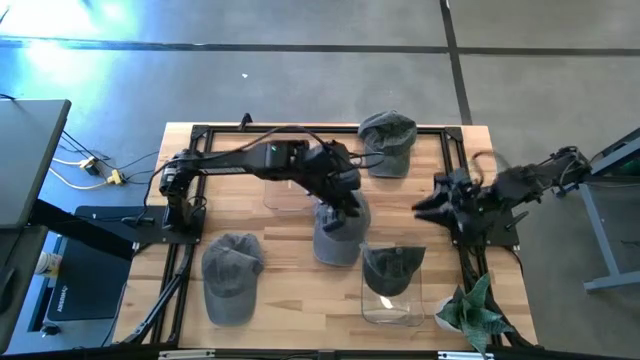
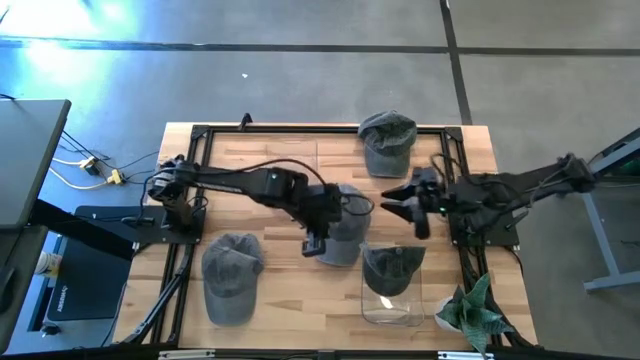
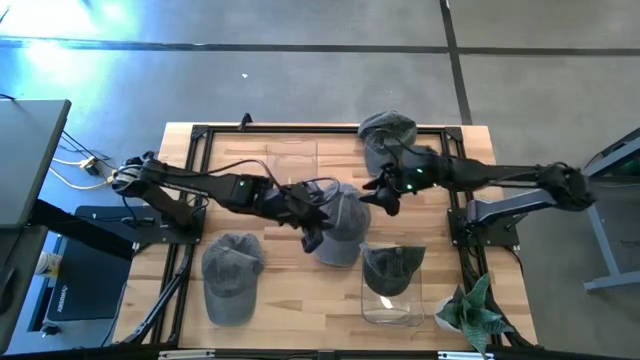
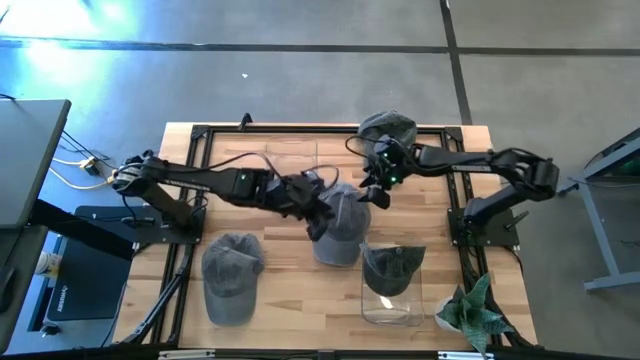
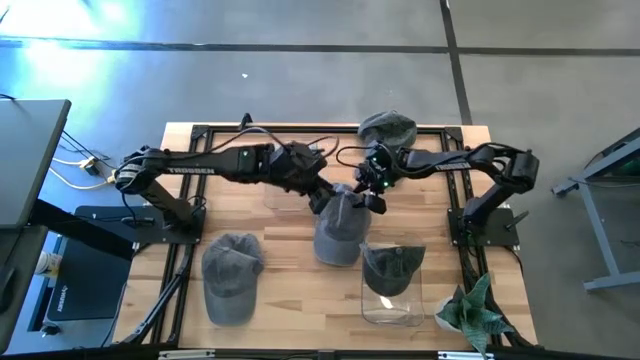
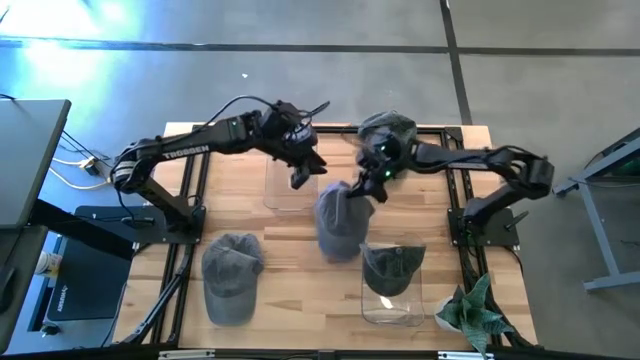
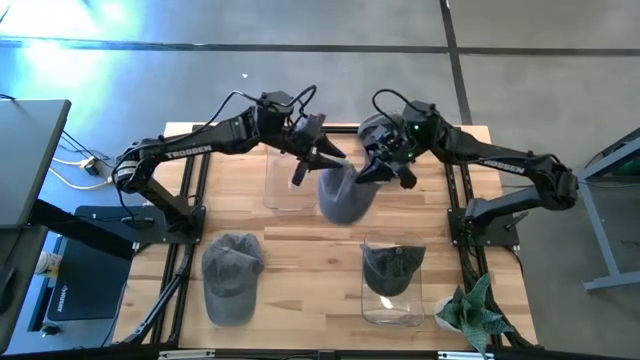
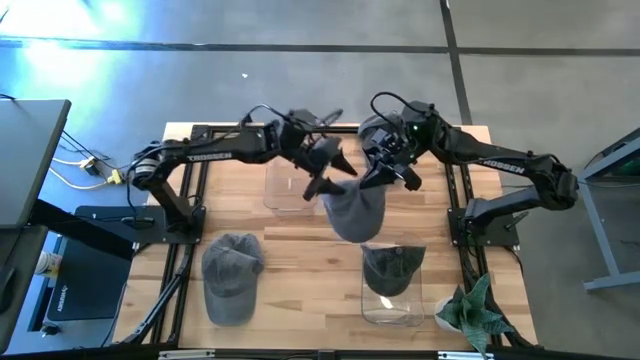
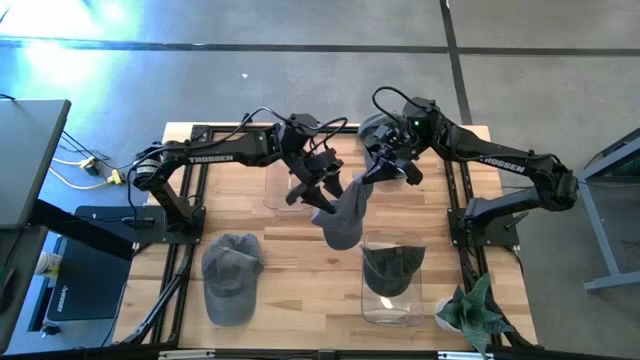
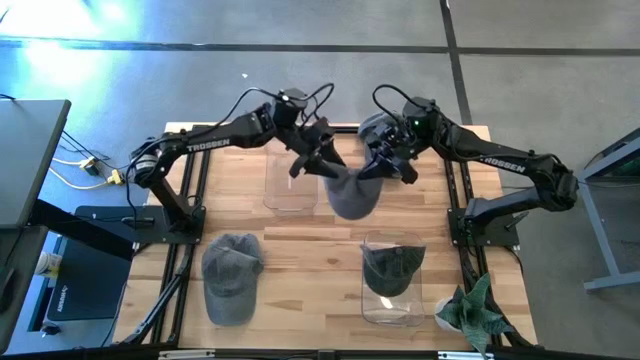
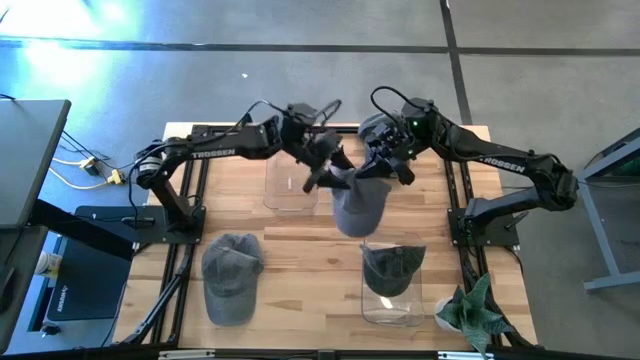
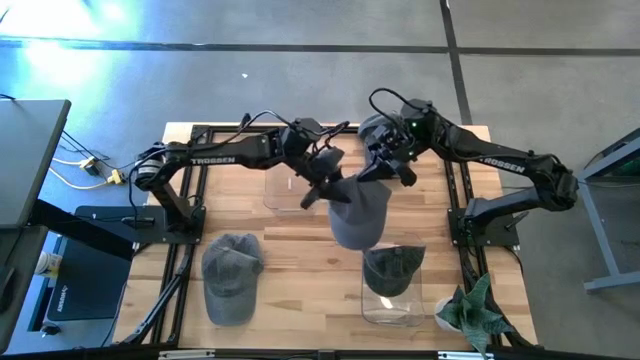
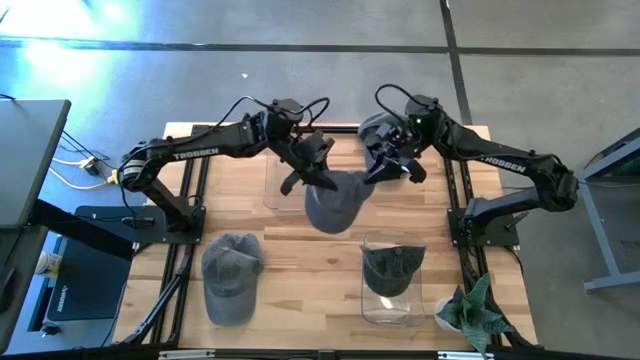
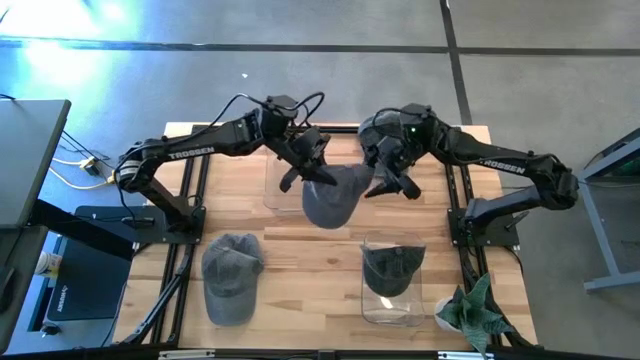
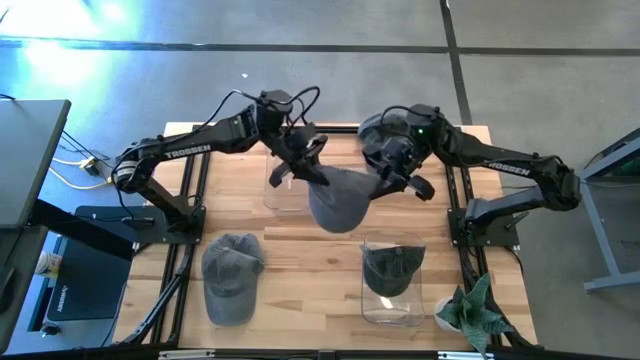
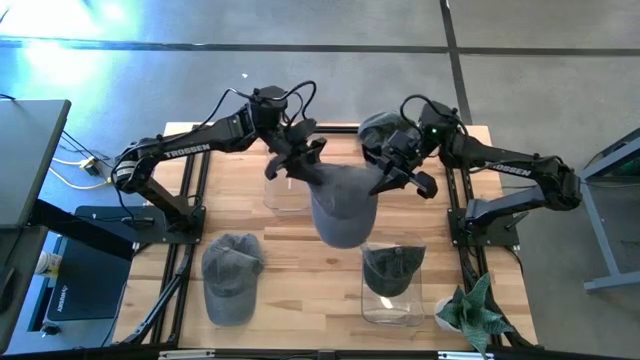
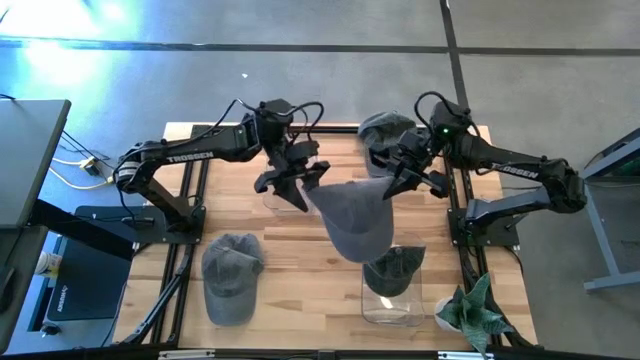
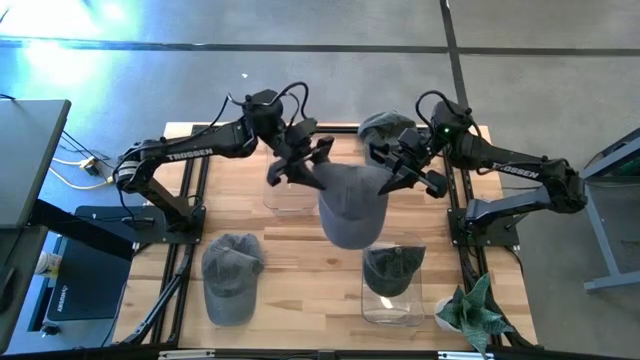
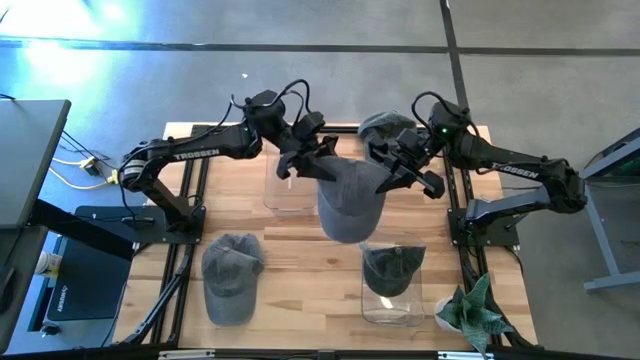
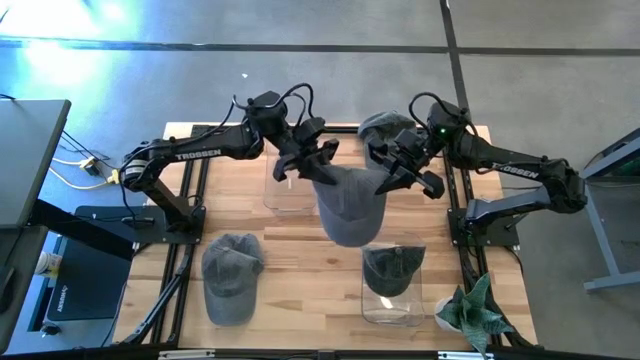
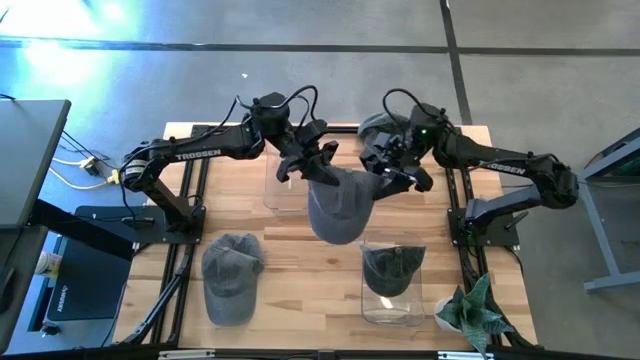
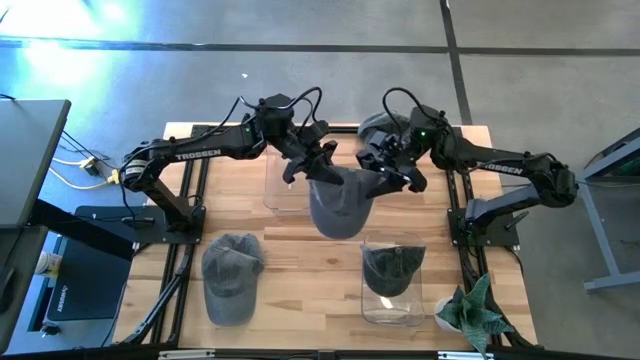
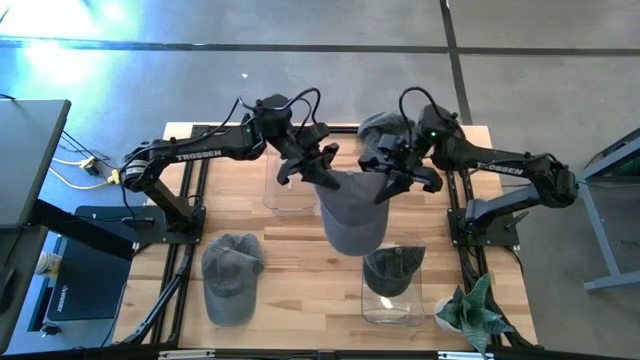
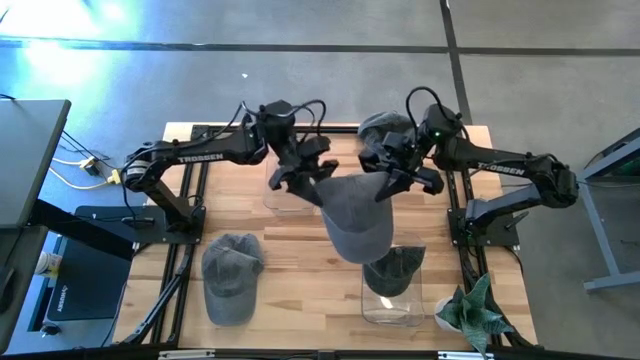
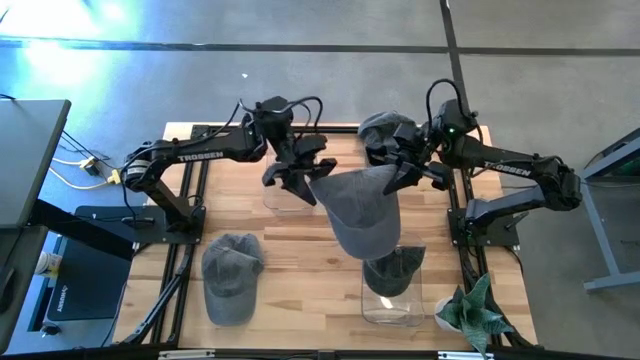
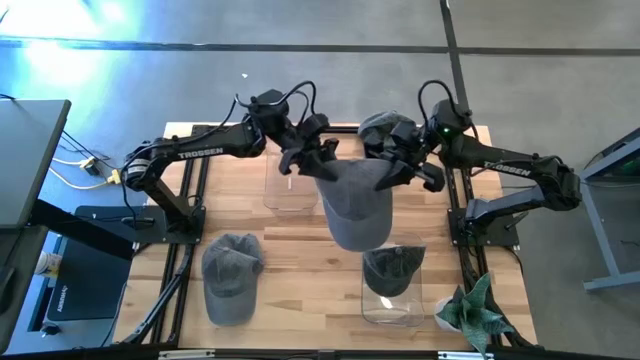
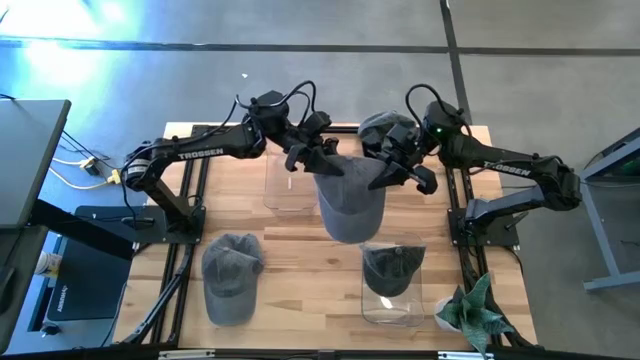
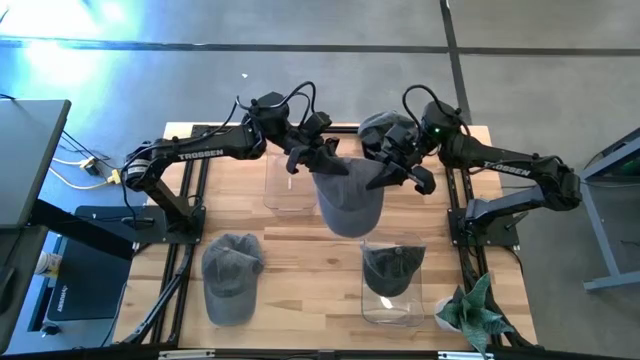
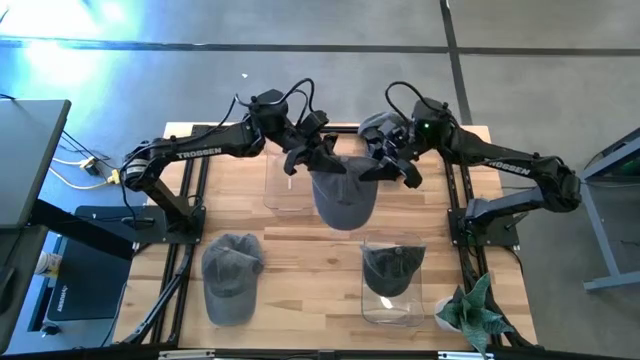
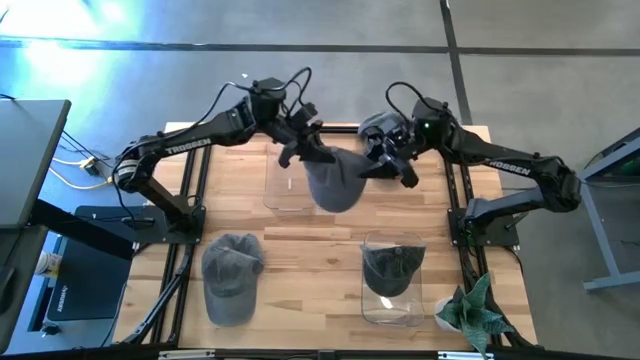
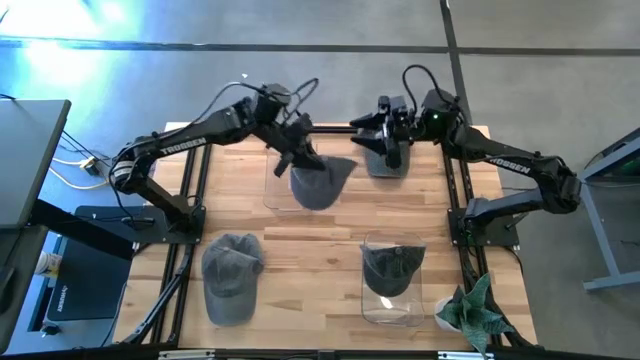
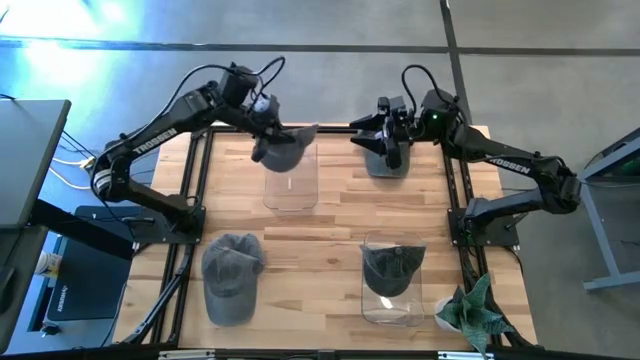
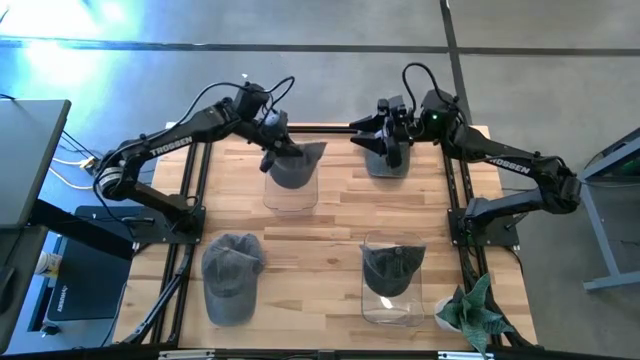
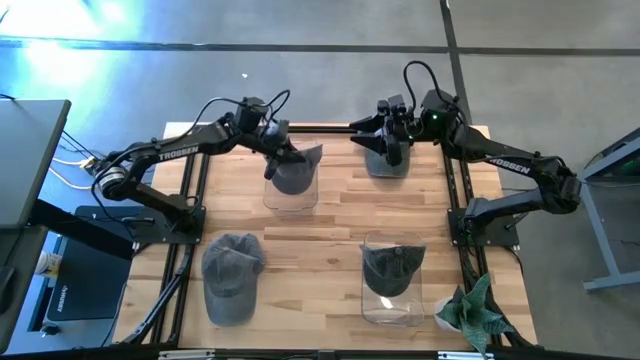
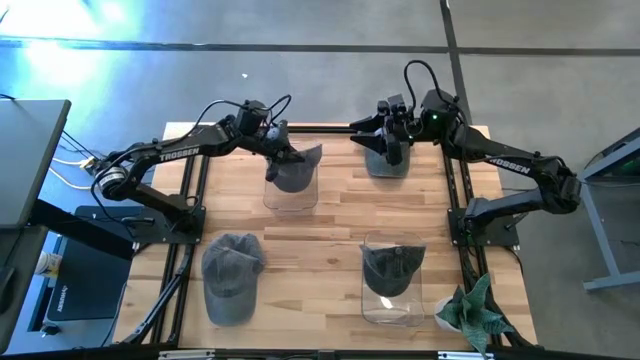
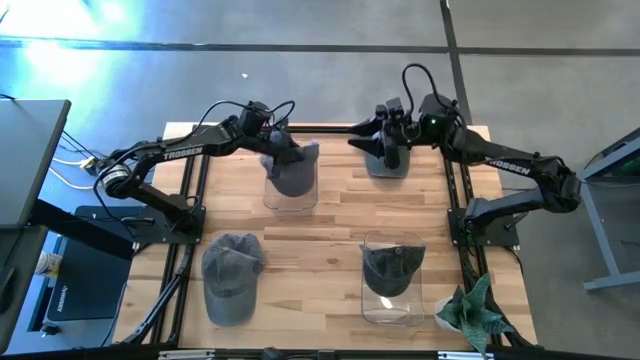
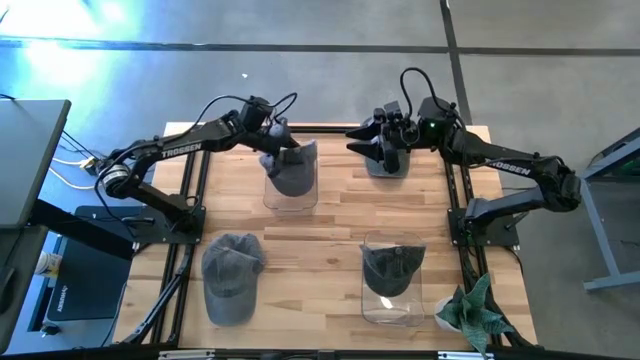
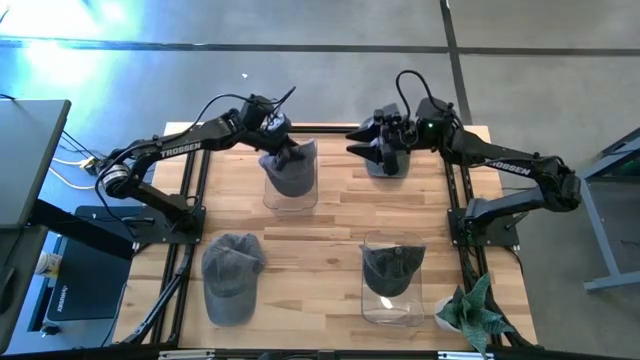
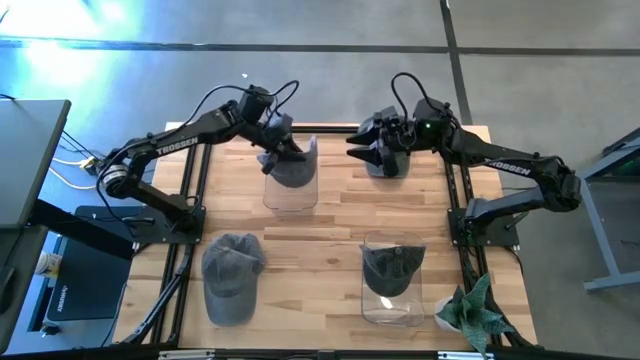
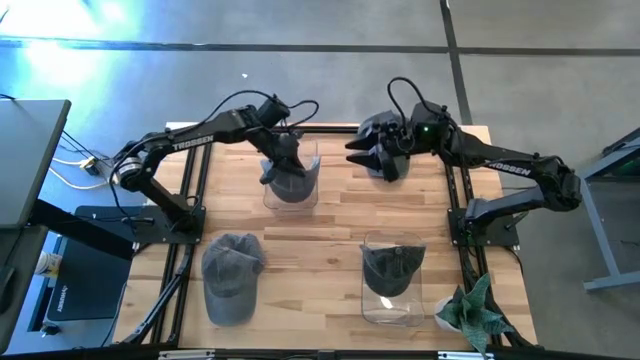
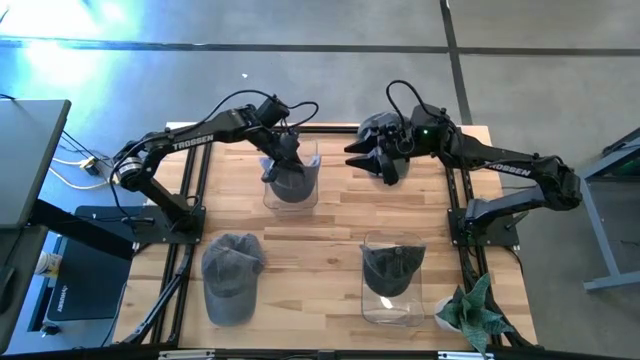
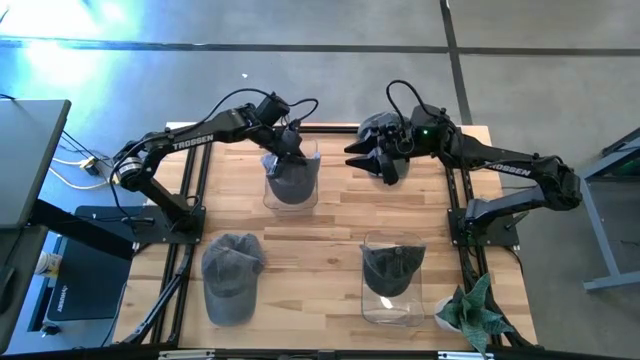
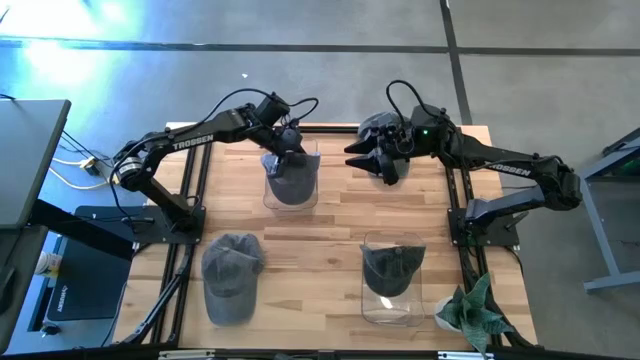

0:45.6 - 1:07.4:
Task: Pick & Place hat
Put the right light gray cap into the top transparent bin
